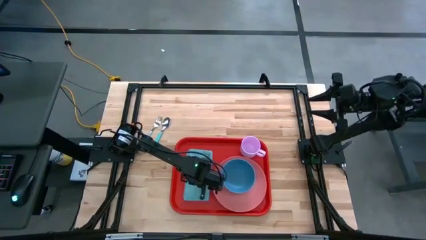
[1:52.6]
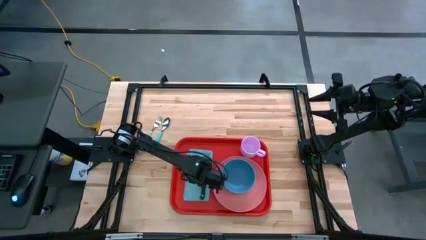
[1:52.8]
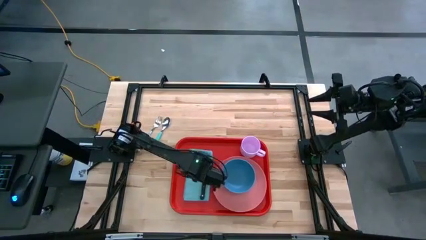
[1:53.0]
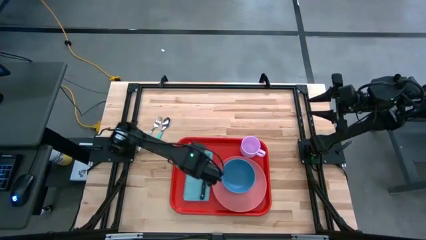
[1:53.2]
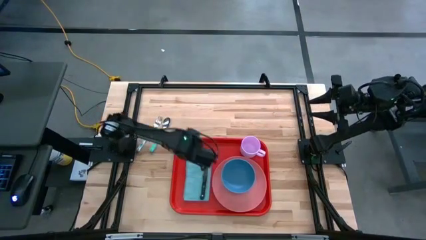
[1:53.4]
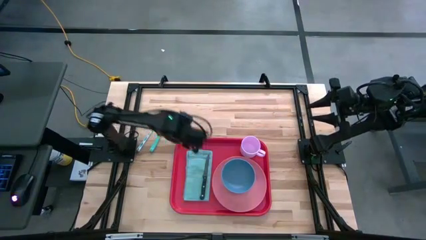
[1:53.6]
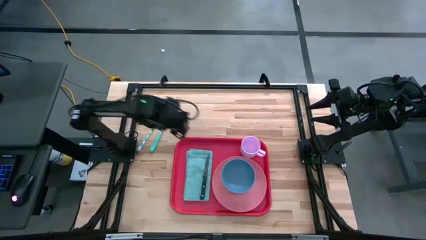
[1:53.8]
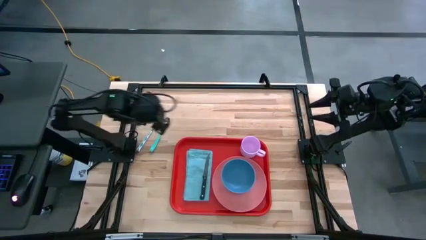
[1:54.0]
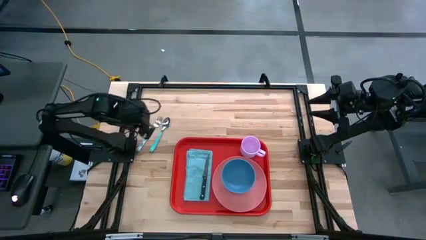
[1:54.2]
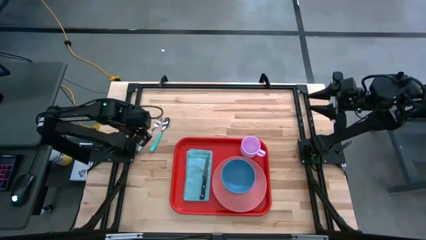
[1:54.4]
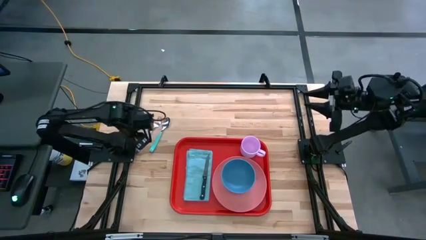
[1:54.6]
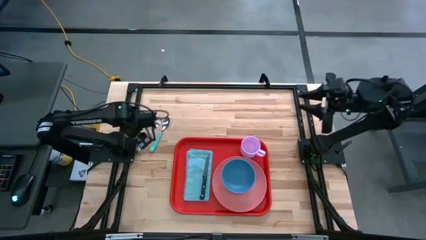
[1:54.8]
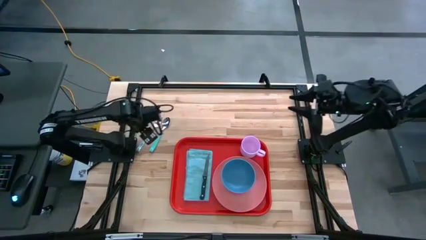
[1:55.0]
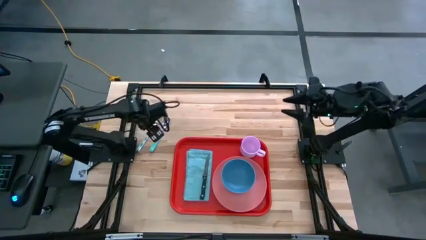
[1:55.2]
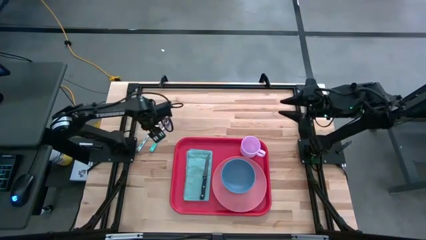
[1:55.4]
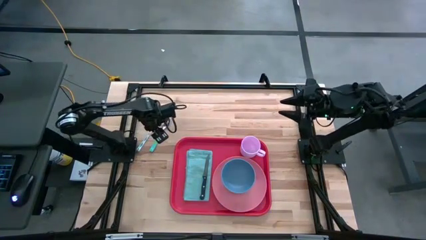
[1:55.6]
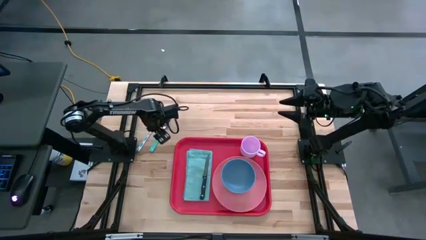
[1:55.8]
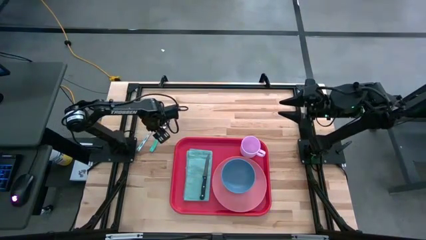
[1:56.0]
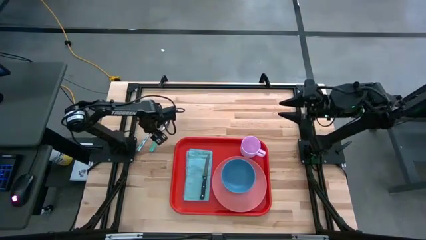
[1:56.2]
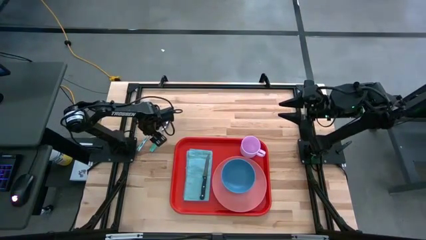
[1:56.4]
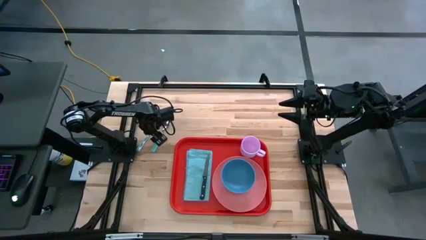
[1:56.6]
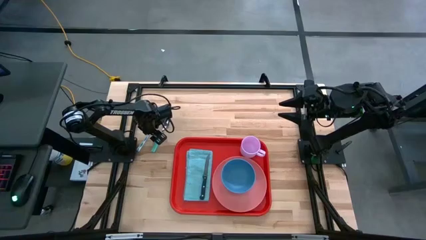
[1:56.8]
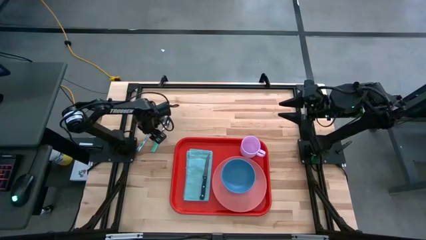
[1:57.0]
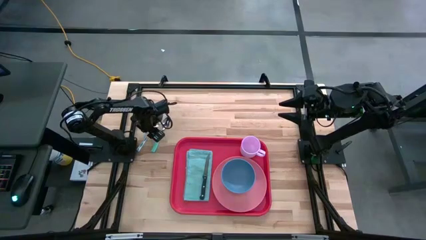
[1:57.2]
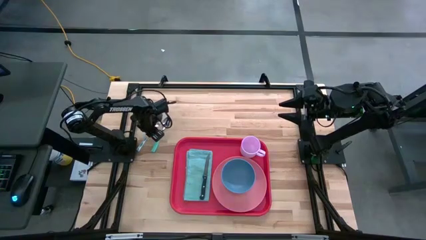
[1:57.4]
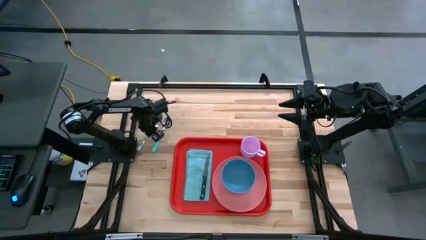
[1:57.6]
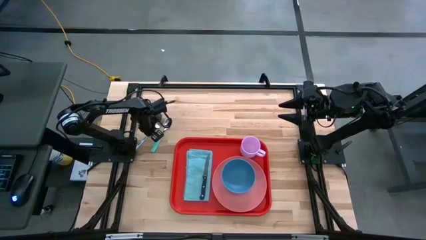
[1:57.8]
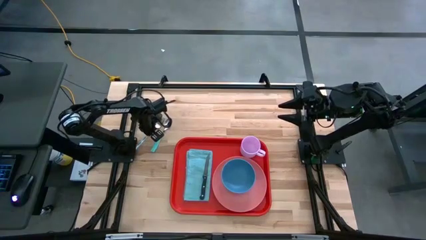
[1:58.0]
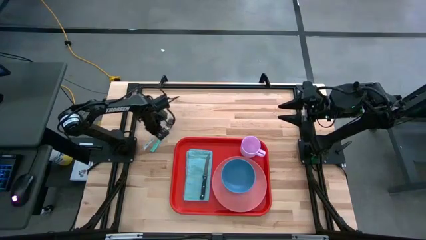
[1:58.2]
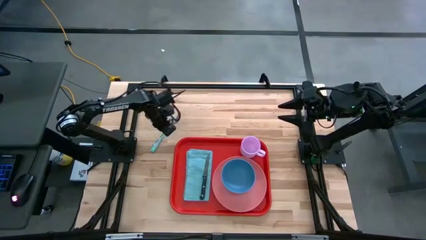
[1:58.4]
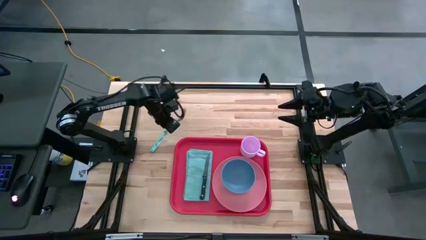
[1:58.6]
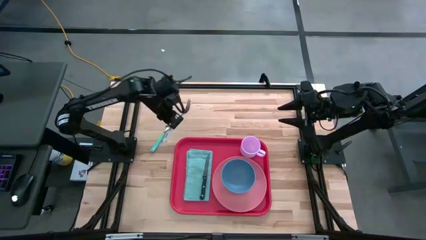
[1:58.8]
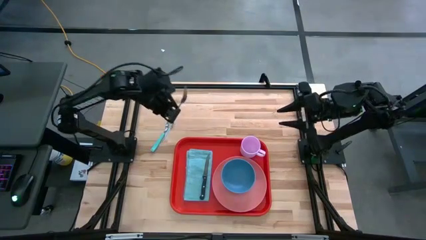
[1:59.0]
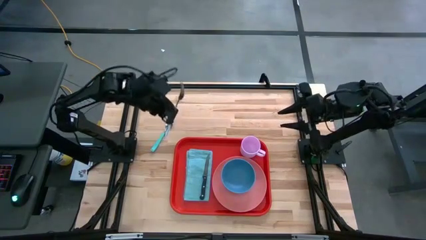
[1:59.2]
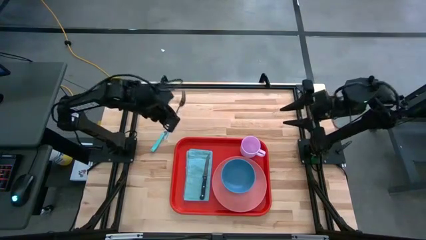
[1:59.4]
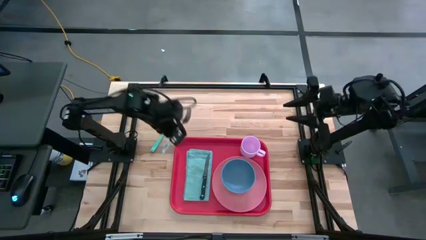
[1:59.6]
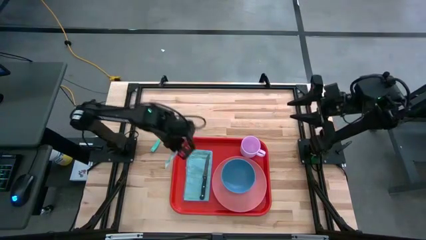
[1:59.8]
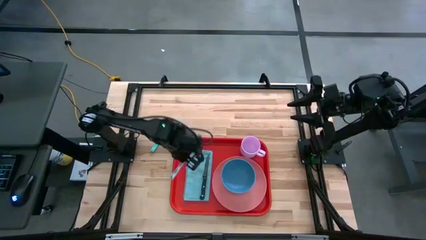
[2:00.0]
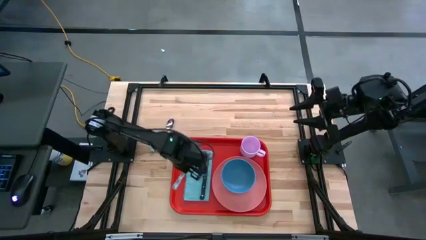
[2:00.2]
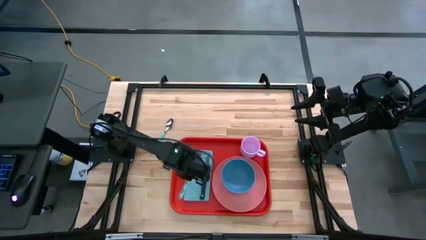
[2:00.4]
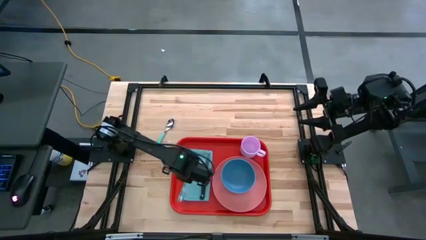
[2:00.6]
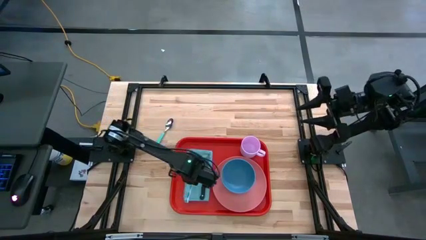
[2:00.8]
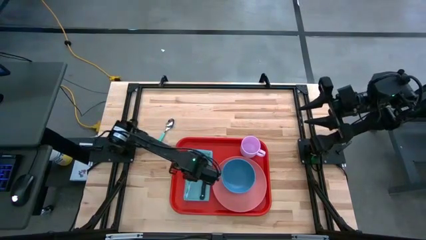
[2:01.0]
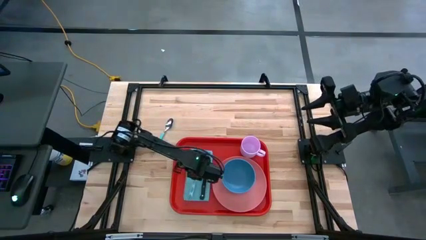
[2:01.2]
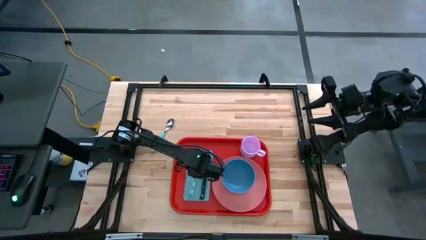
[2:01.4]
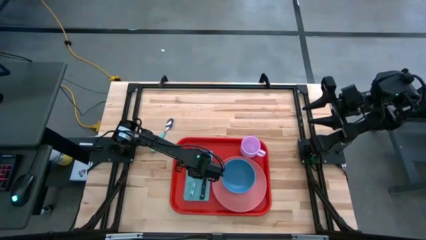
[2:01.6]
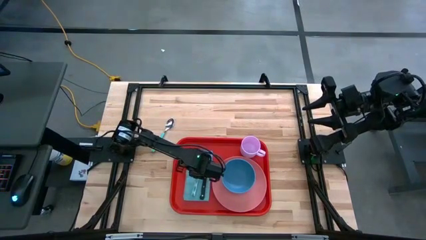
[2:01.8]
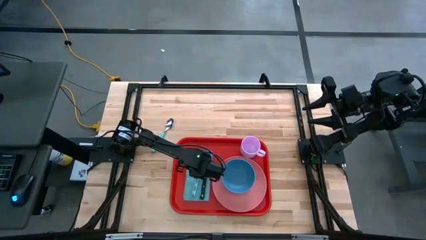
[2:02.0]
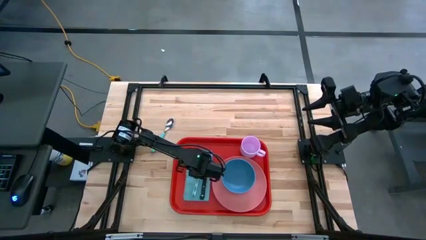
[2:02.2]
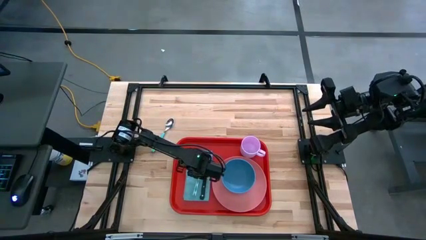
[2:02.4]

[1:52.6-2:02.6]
Task: Set up tray
Put the fork into the blue napkin

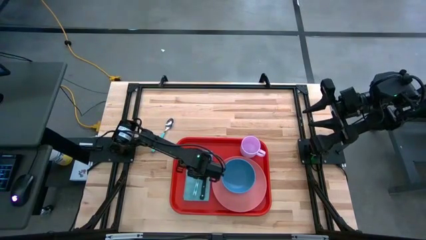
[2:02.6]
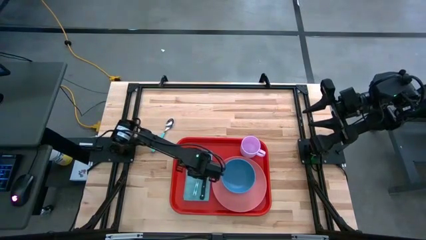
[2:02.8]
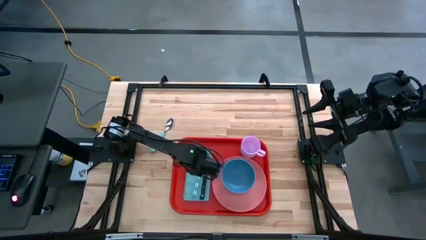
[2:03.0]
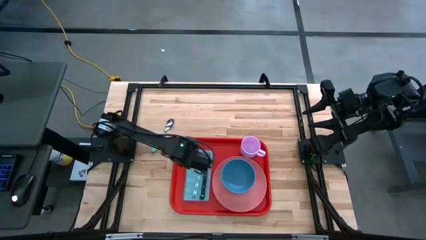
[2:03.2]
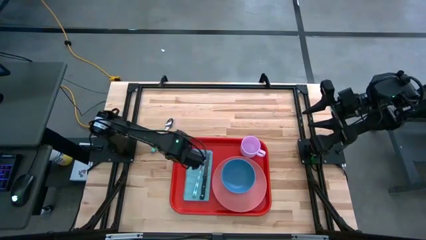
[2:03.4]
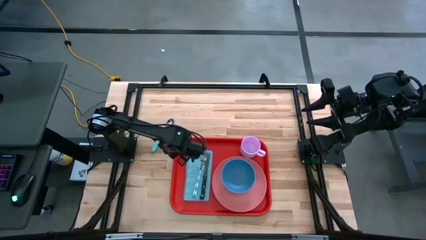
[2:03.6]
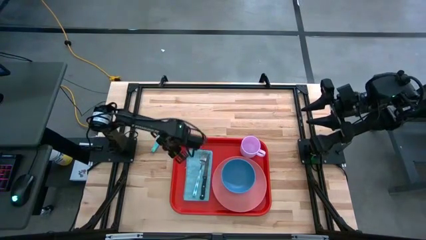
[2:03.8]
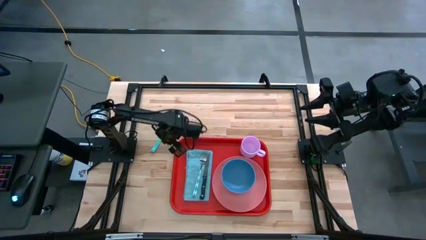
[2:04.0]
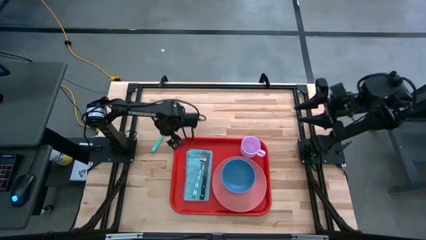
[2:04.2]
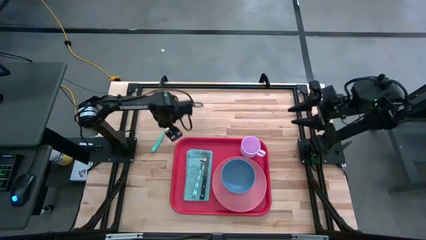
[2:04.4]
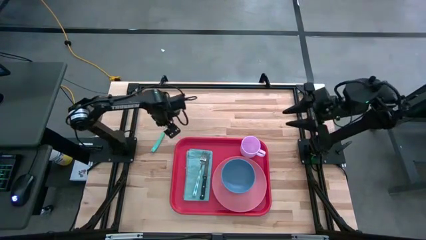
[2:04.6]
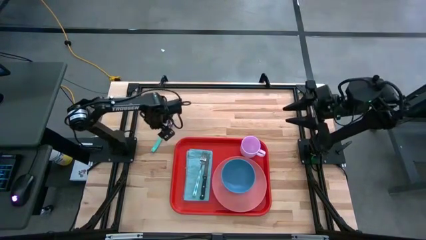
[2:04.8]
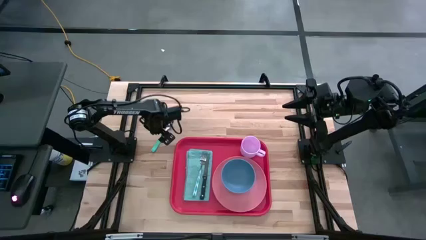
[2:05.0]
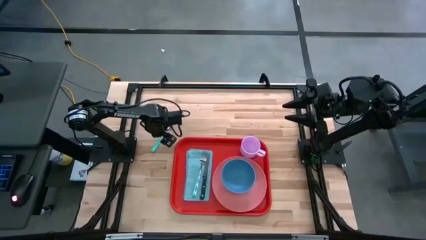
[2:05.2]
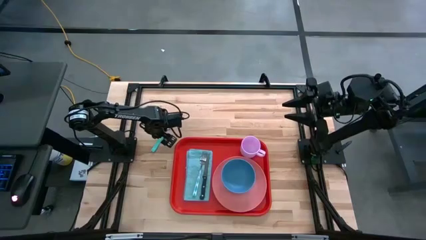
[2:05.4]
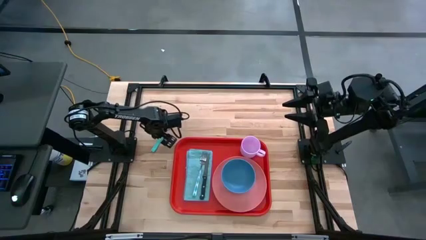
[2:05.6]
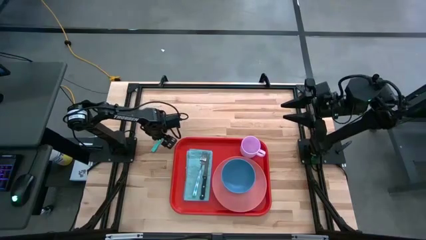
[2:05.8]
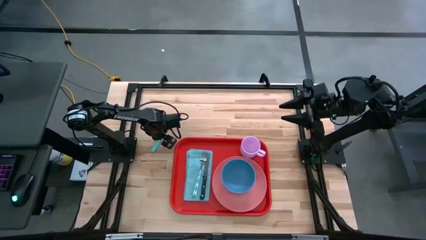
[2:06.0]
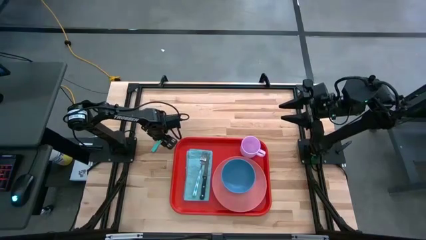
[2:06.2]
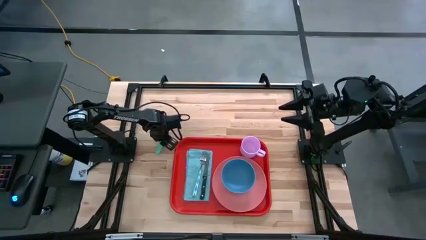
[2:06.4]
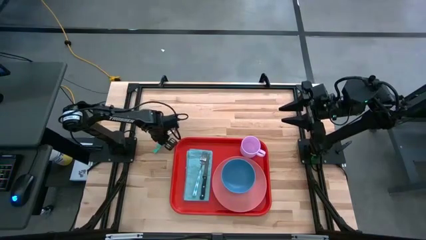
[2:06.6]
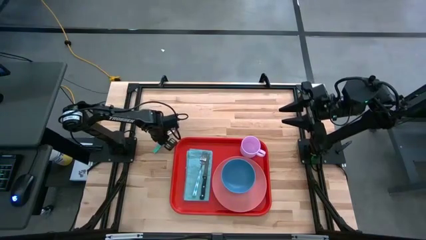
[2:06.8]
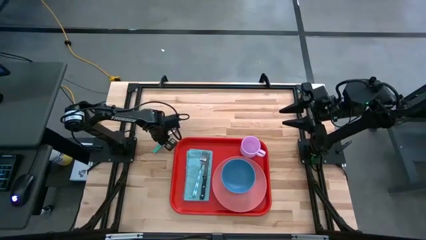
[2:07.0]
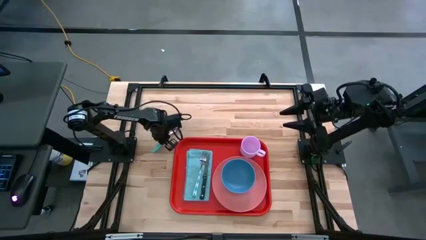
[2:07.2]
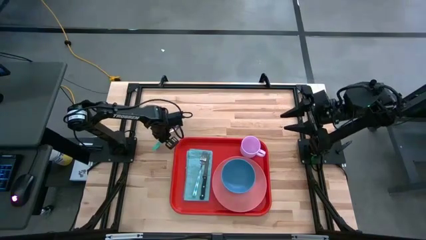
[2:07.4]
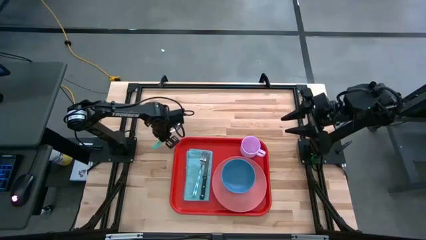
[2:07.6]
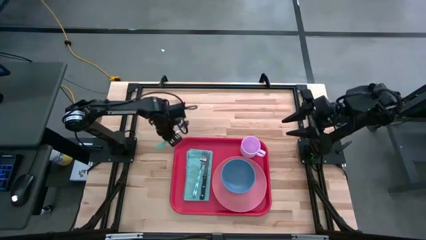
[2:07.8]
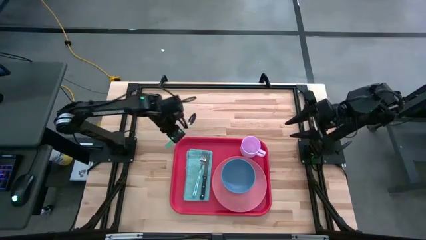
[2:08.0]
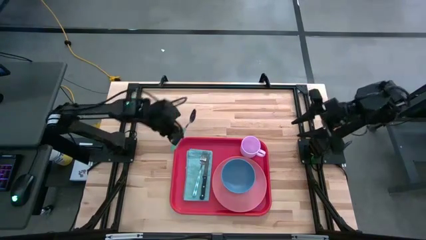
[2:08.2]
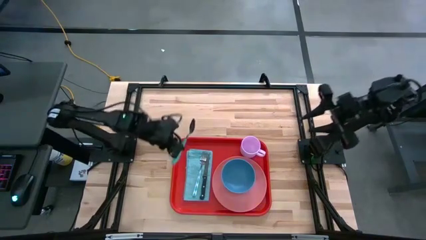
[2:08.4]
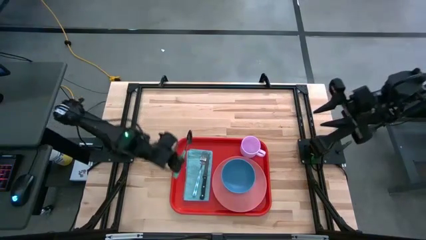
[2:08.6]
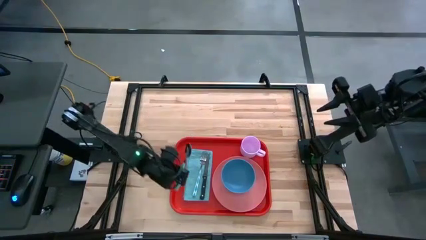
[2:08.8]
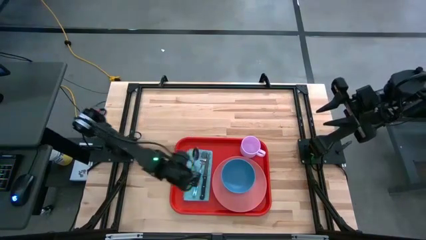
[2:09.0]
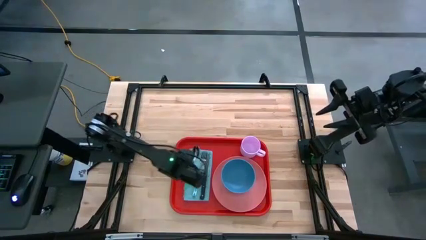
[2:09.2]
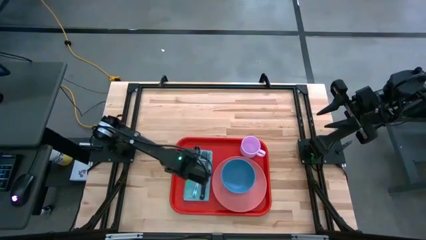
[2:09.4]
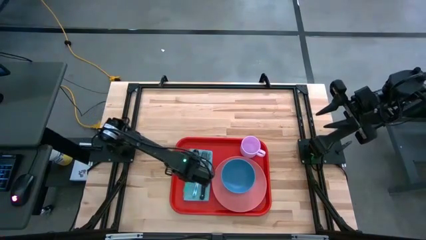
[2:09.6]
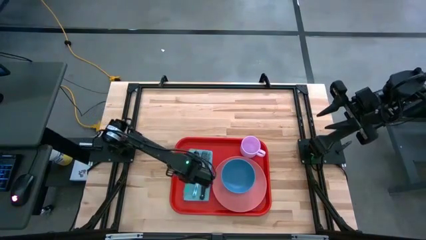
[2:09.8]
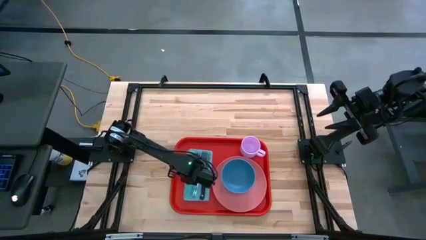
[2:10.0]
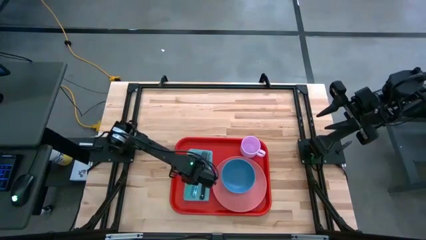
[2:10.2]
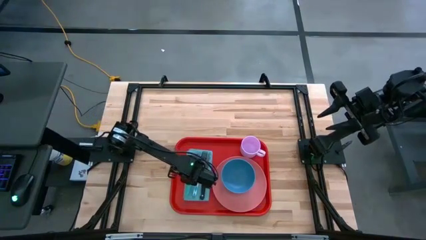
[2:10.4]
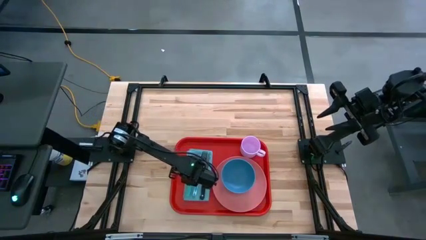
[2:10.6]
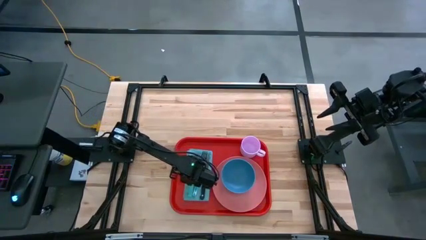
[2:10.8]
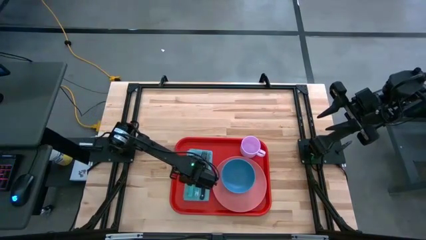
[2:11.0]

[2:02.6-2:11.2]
Put the spoon into the blue napkin
